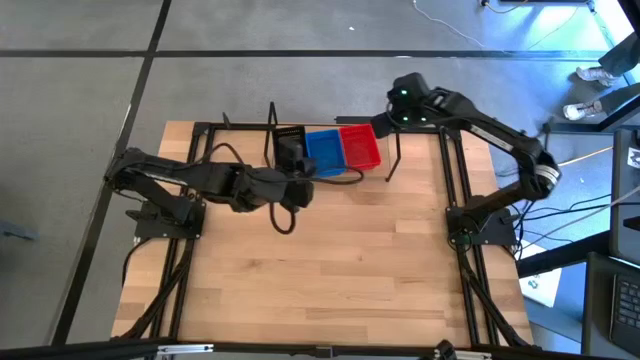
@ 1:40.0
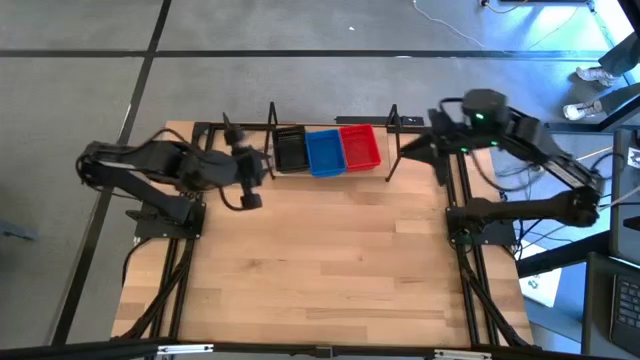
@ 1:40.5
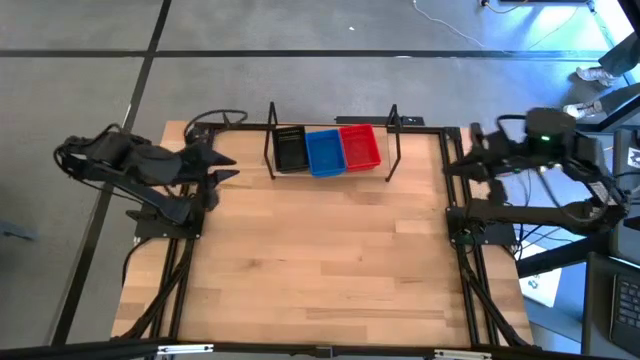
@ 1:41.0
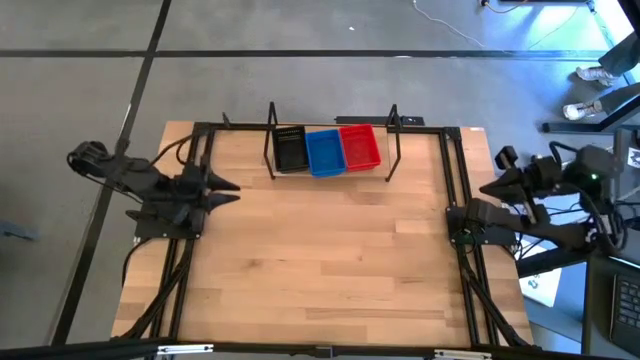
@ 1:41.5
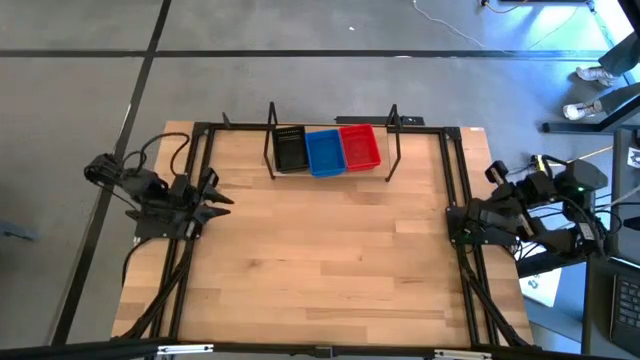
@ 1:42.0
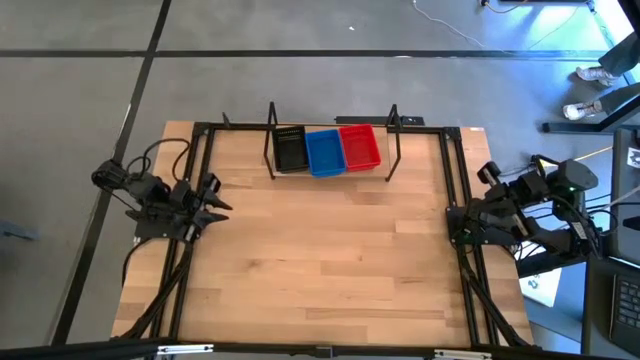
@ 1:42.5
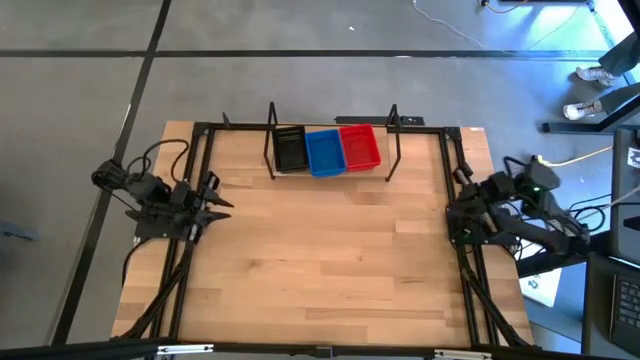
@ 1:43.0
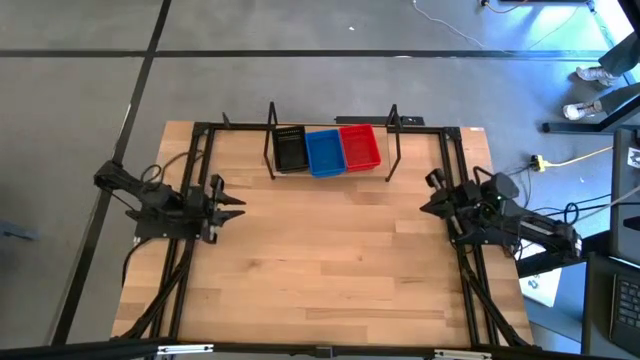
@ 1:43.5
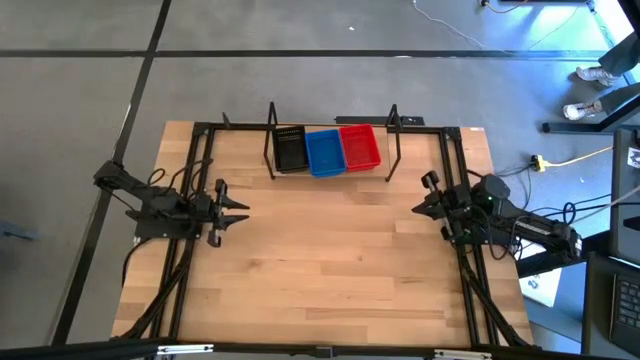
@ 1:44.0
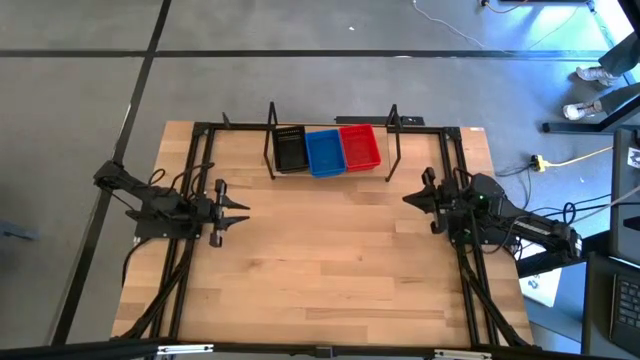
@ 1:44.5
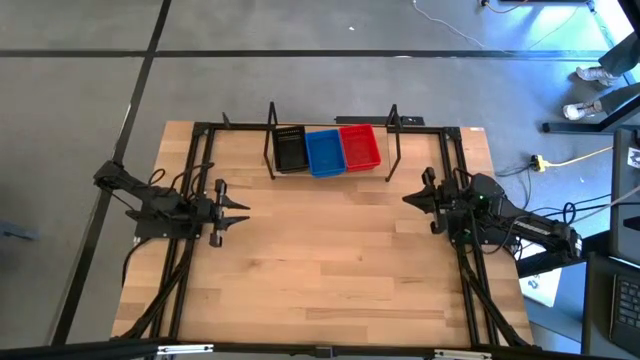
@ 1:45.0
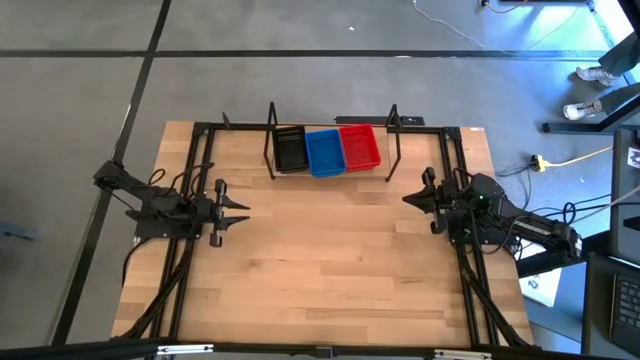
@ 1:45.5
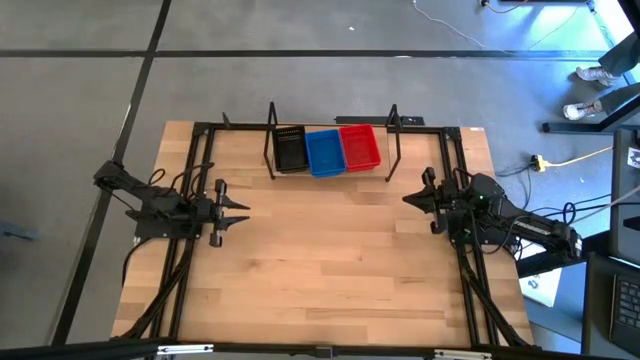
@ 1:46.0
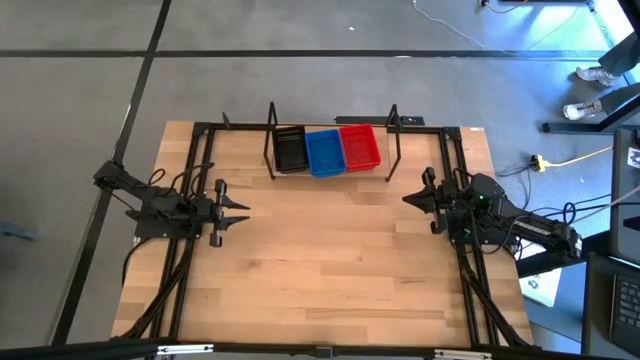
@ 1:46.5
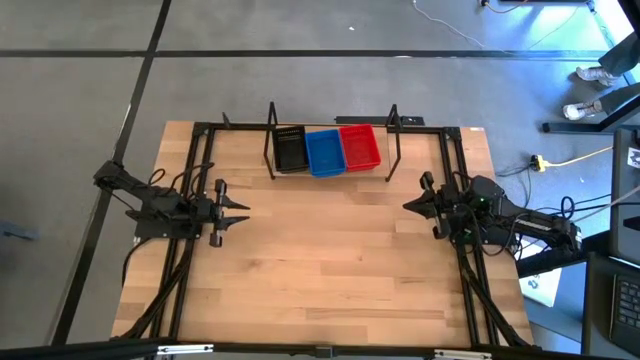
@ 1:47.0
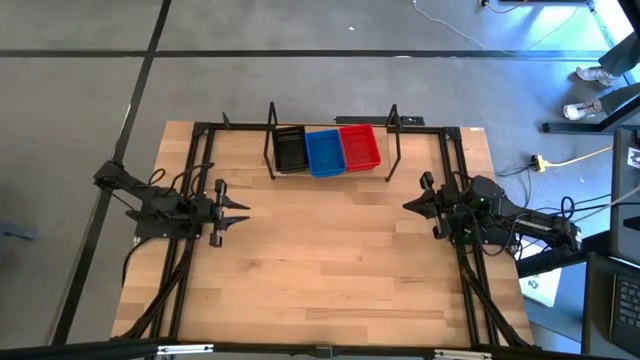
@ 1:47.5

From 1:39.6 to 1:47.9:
Task: Stack baskets on shelf by color
Return to Home Position
